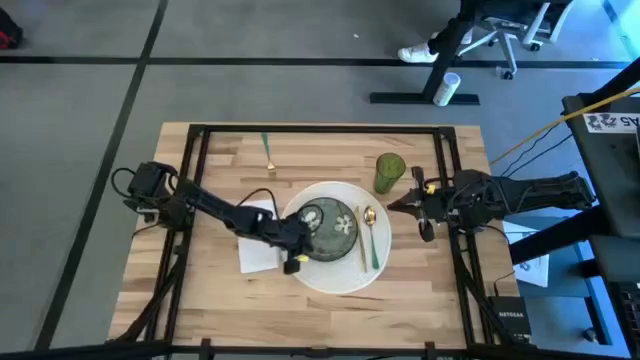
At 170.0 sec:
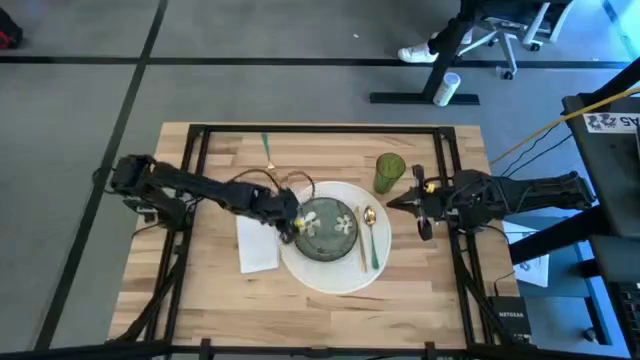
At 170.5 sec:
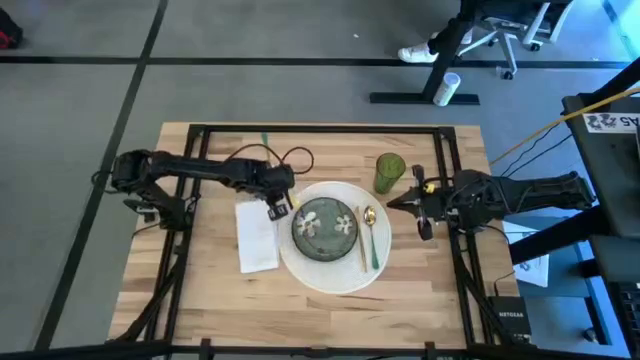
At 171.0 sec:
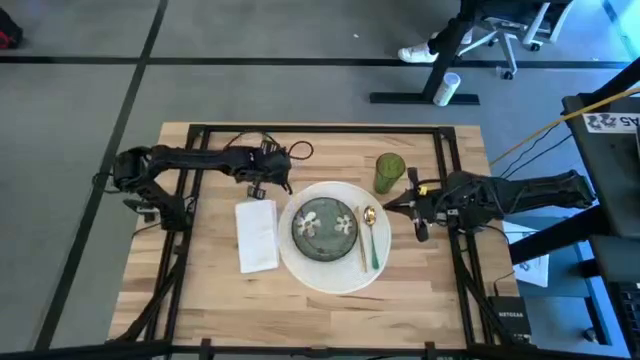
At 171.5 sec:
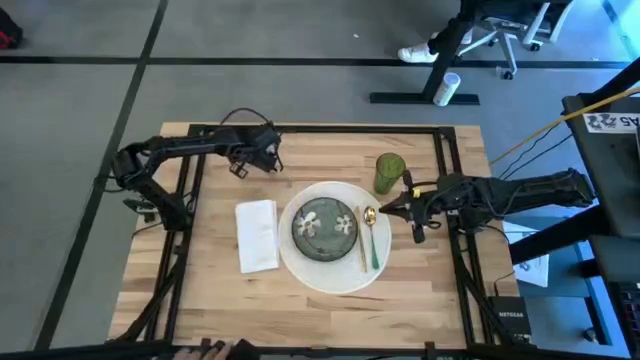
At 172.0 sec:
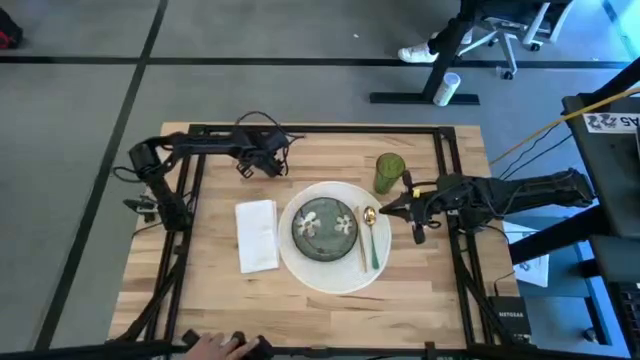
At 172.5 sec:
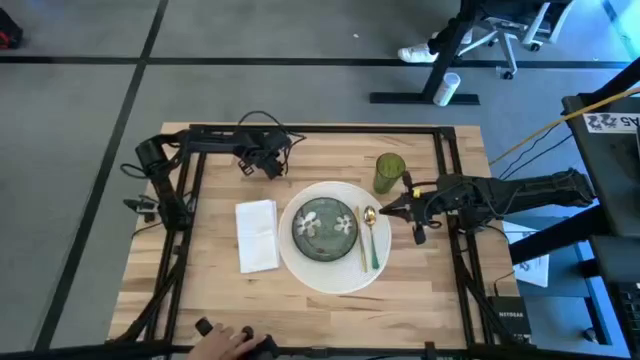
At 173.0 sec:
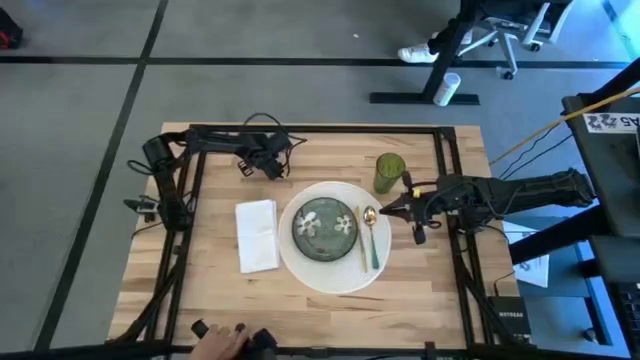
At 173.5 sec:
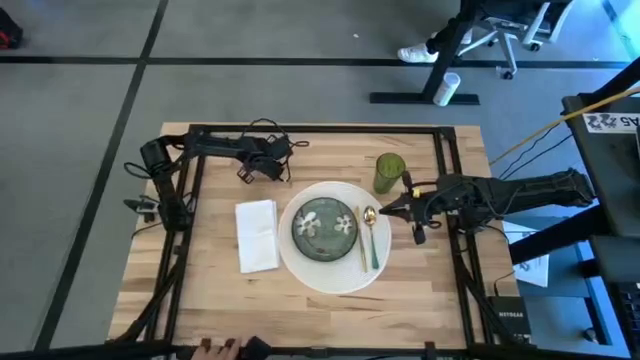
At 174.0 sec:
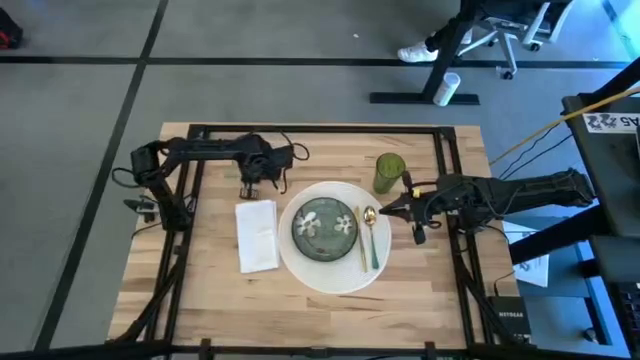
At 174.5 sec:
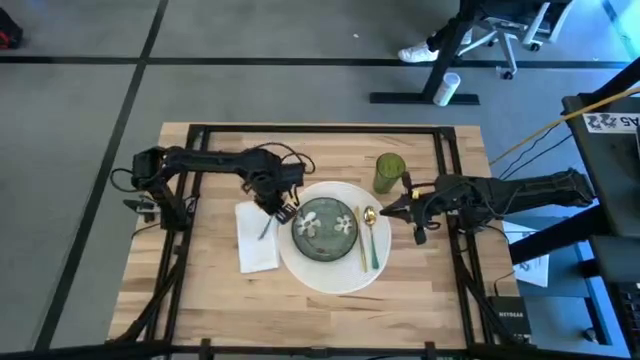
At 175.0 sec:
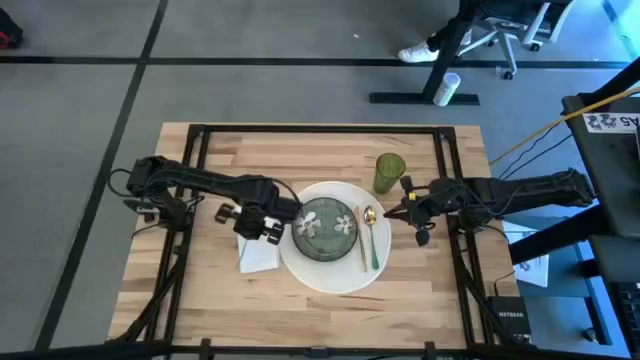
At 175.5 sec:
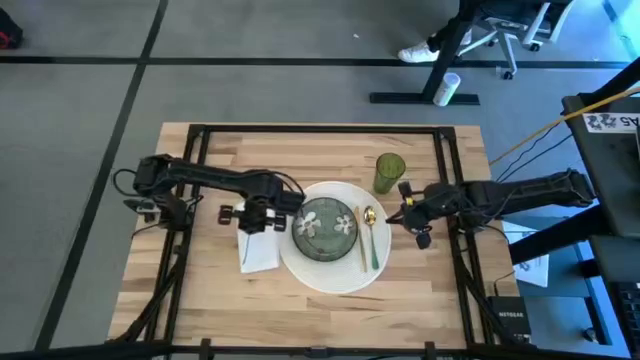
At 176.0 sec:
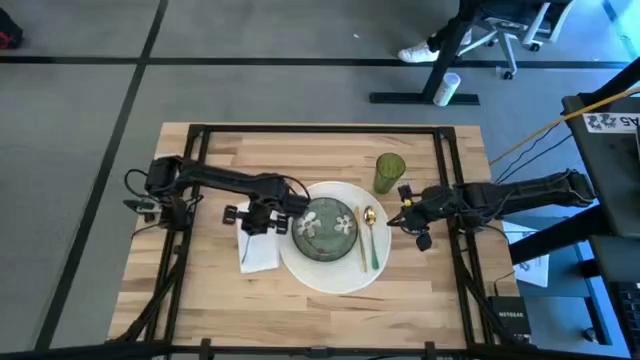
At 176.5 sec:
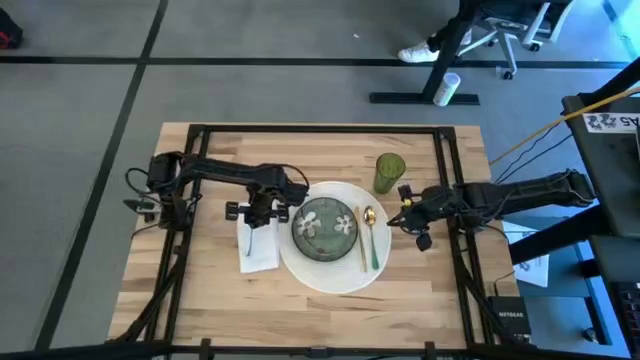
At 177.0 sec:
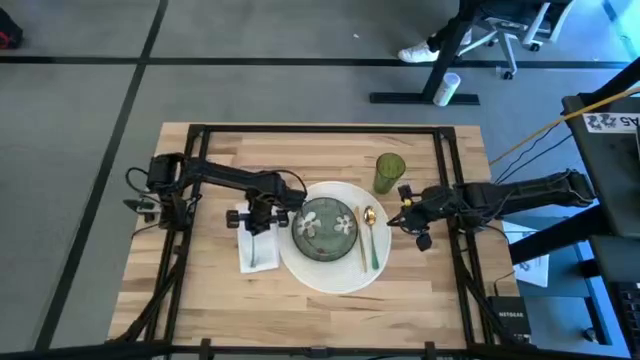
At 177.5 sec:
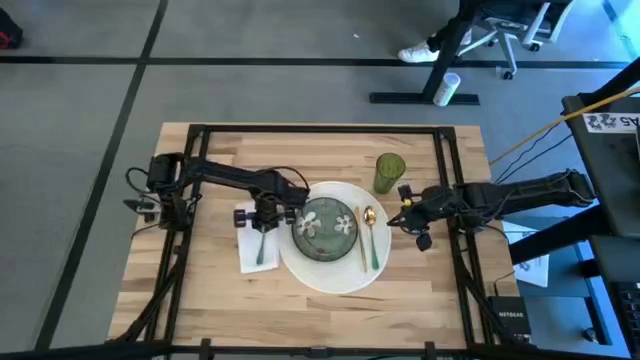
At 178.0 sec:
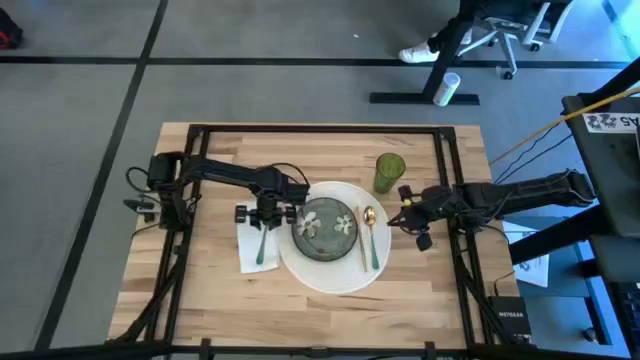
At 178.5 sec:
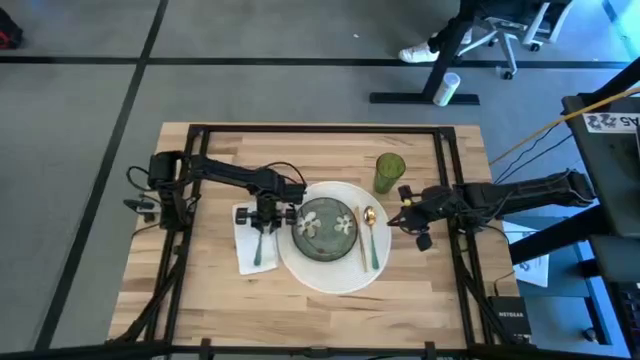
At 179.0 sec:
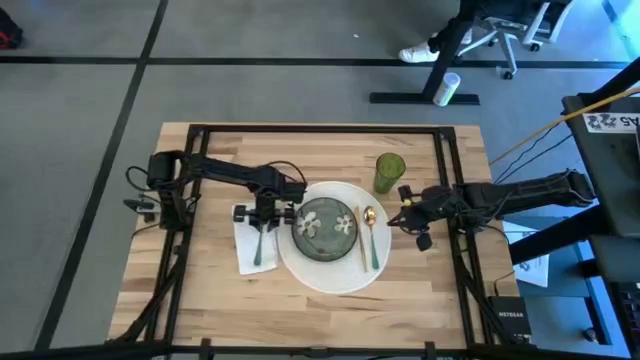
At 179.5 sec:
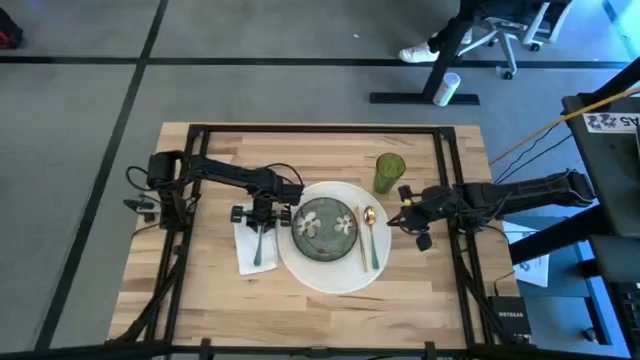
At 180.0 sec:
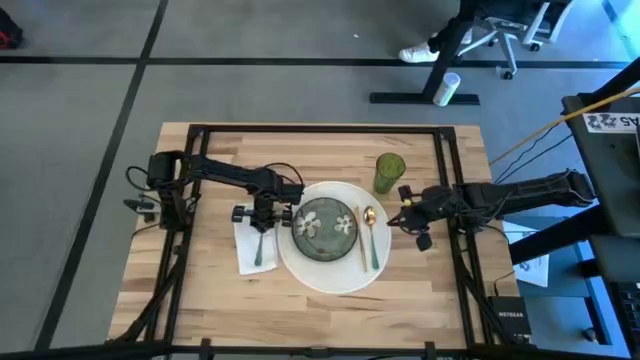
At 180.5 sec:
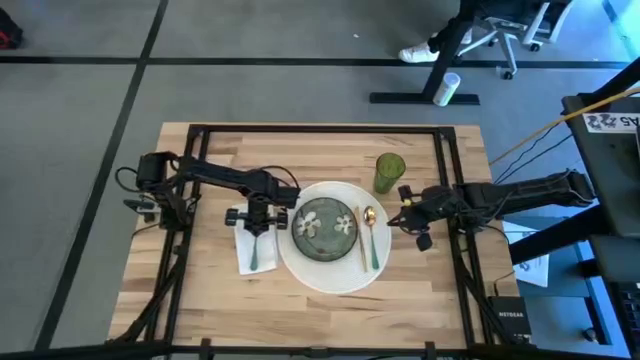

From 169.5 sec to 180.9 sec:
Task: Set table place
Put the green fork on the white table napkin

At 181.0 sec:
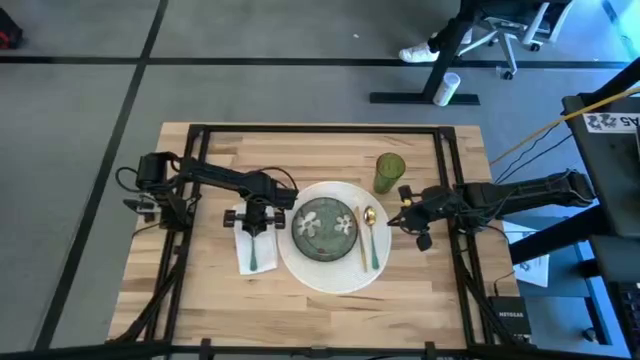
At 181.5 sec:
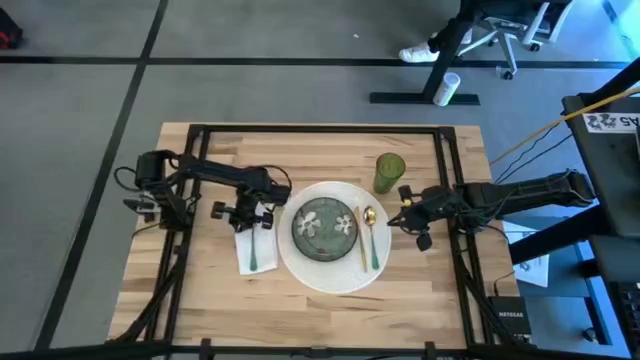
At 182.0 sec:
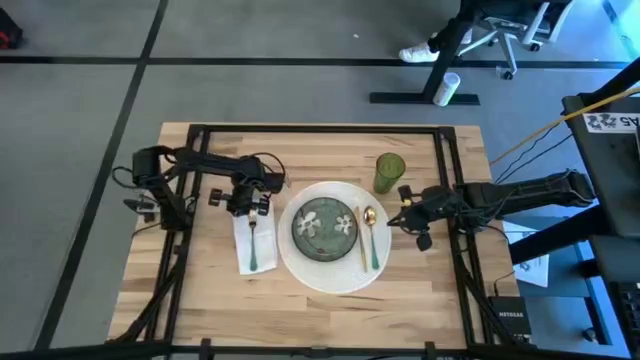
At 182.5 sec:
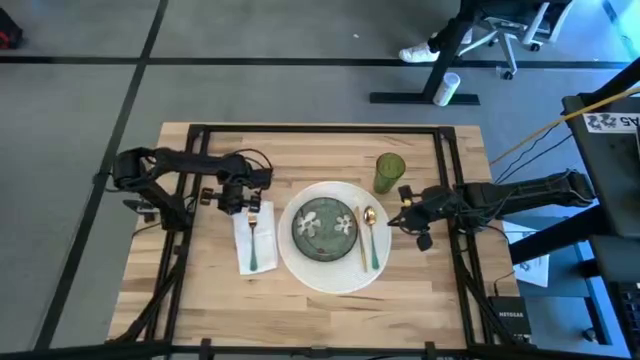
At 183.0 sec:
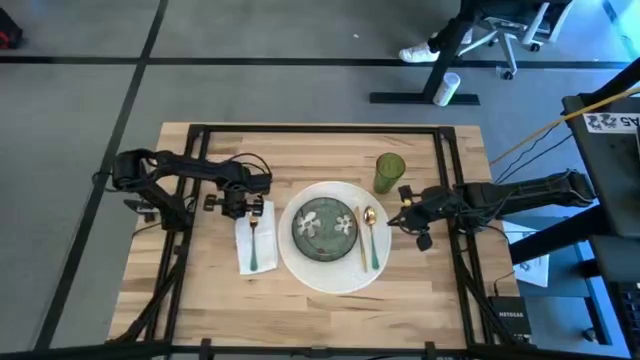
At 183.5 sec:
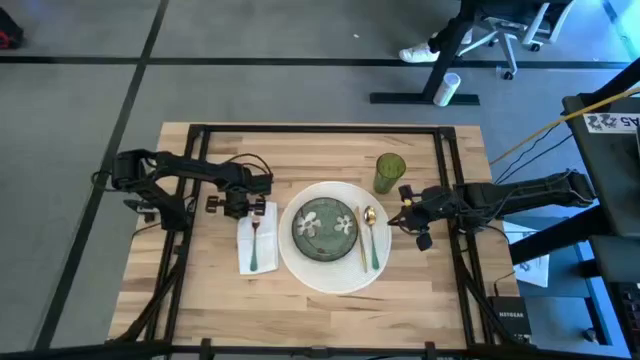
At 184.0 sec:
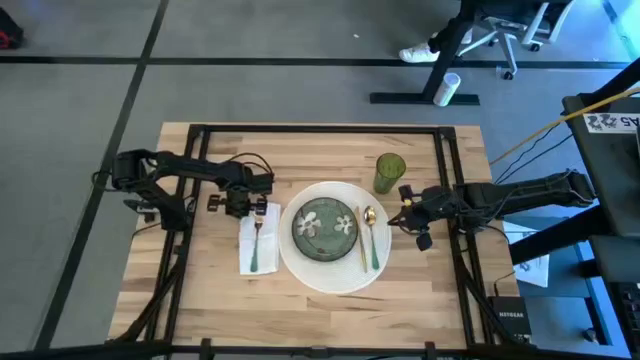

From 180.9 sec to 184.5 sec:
Adjust the white table napkin
